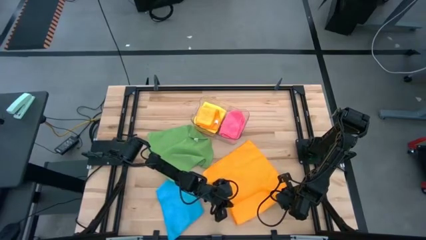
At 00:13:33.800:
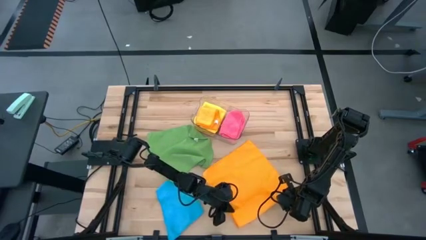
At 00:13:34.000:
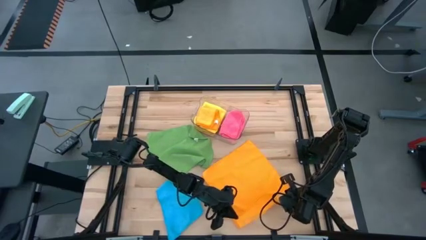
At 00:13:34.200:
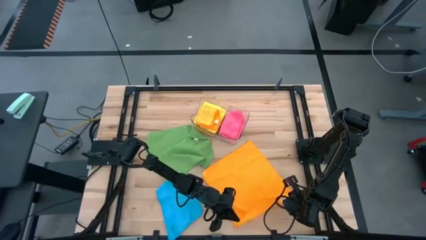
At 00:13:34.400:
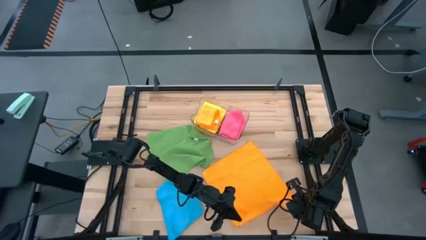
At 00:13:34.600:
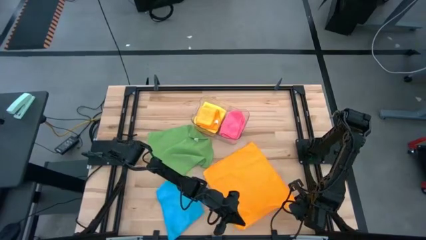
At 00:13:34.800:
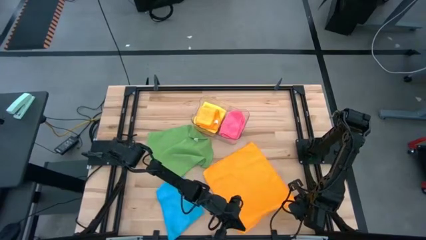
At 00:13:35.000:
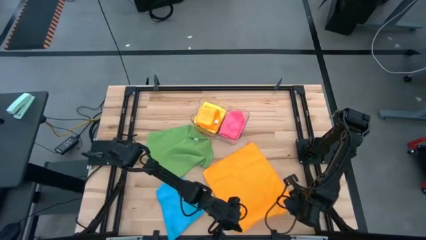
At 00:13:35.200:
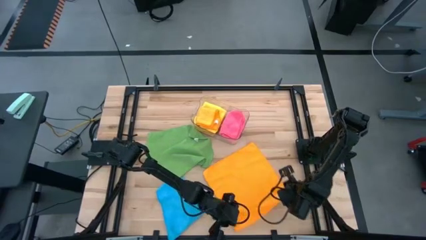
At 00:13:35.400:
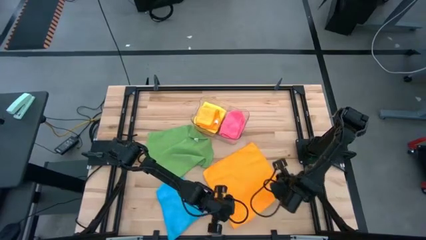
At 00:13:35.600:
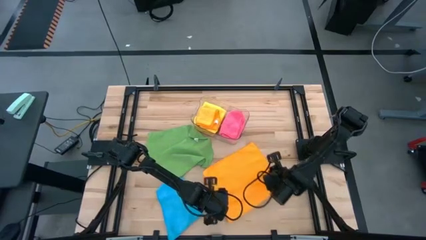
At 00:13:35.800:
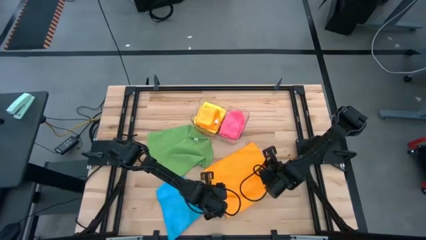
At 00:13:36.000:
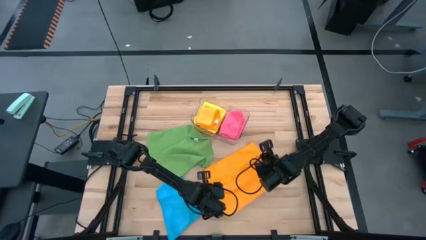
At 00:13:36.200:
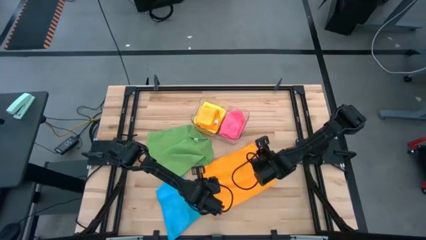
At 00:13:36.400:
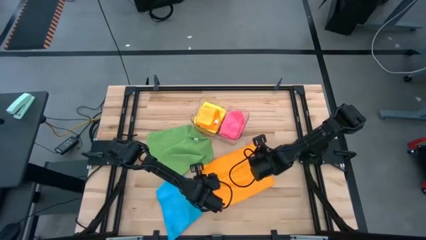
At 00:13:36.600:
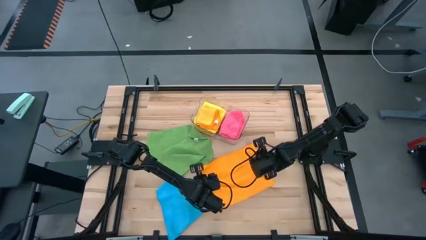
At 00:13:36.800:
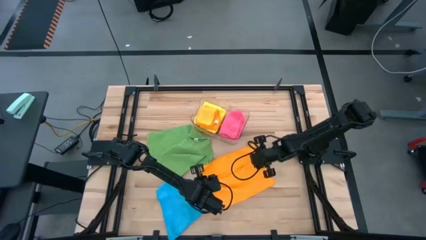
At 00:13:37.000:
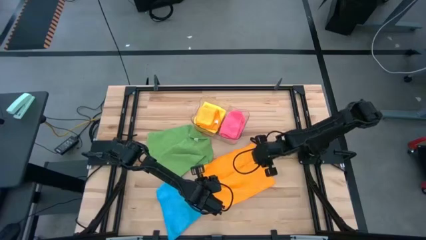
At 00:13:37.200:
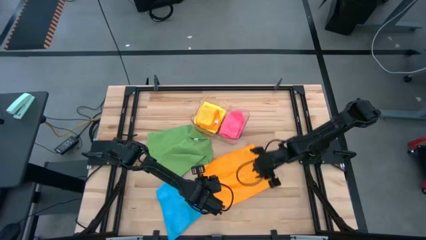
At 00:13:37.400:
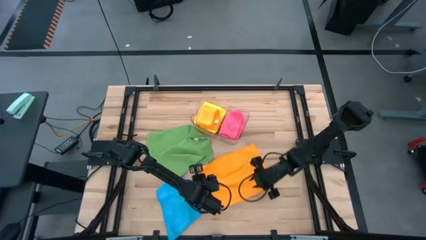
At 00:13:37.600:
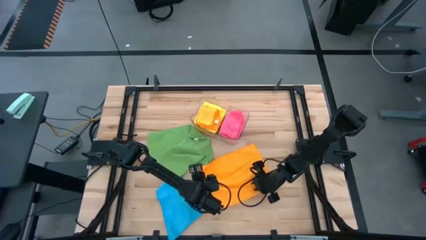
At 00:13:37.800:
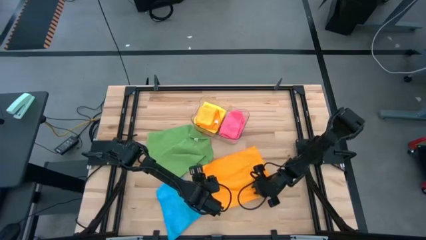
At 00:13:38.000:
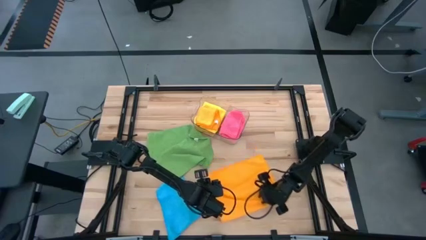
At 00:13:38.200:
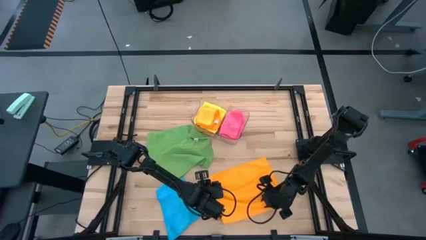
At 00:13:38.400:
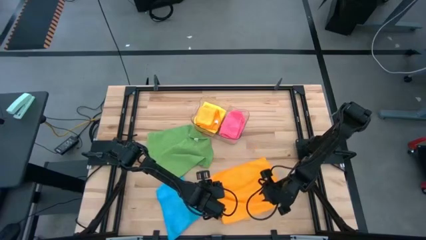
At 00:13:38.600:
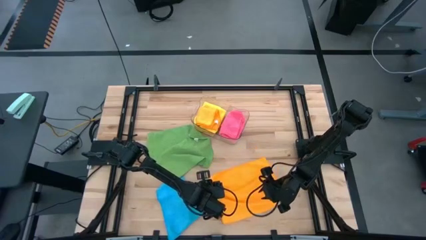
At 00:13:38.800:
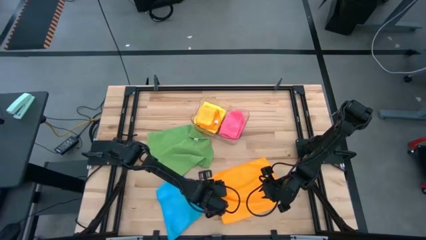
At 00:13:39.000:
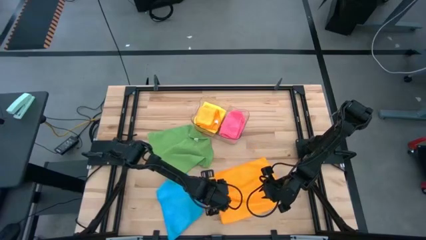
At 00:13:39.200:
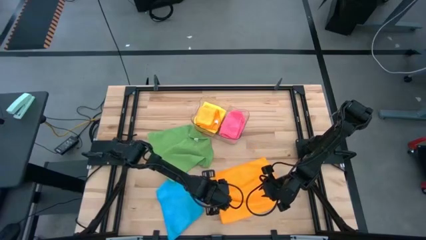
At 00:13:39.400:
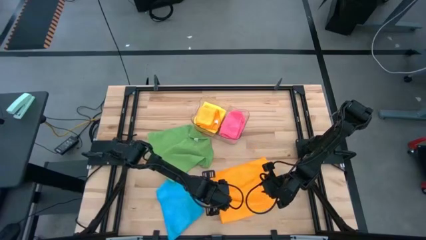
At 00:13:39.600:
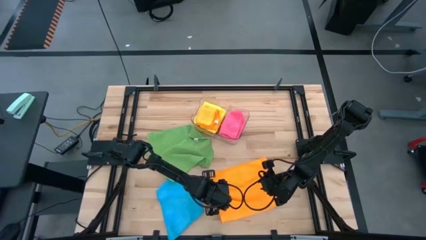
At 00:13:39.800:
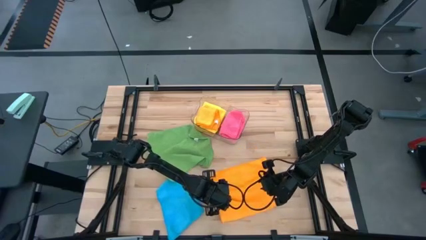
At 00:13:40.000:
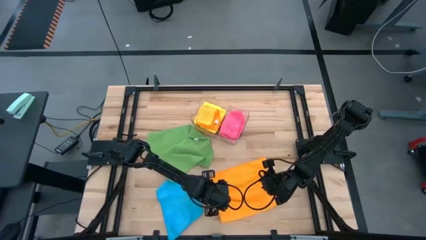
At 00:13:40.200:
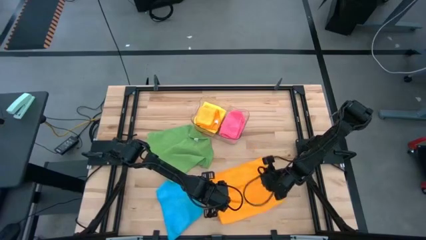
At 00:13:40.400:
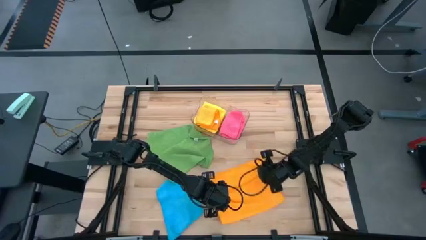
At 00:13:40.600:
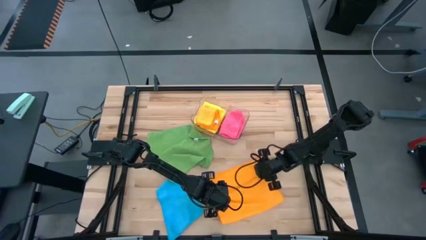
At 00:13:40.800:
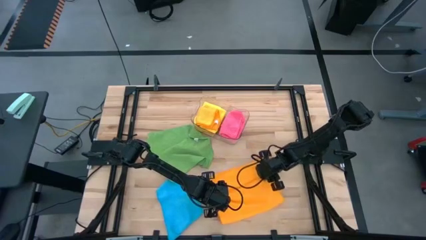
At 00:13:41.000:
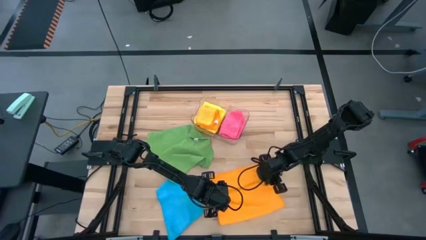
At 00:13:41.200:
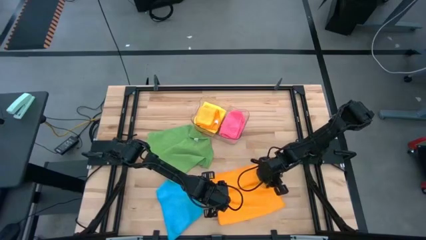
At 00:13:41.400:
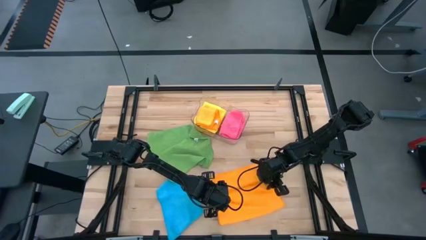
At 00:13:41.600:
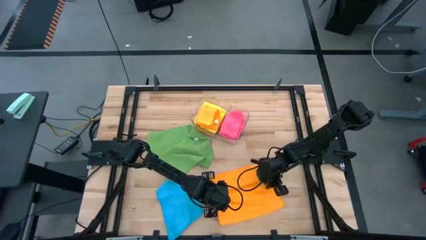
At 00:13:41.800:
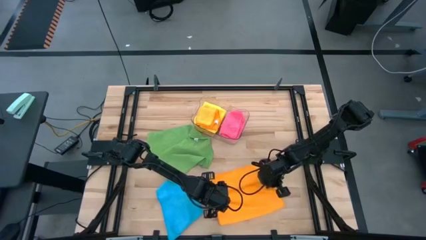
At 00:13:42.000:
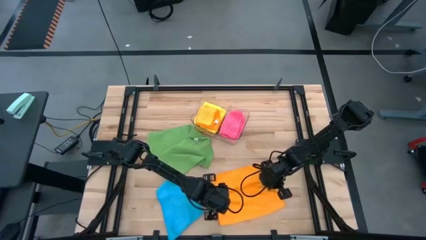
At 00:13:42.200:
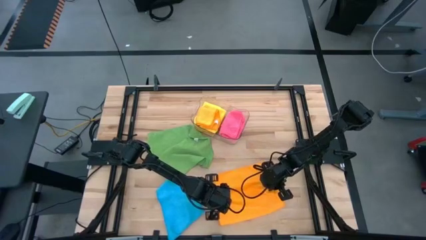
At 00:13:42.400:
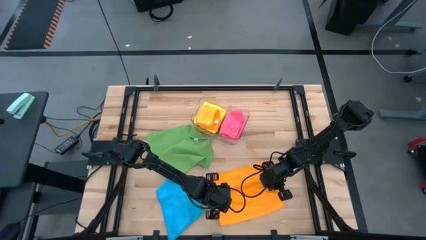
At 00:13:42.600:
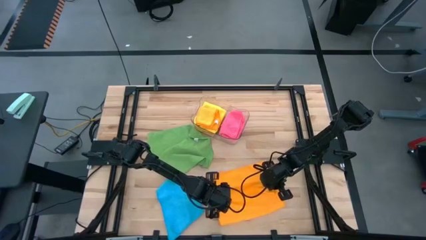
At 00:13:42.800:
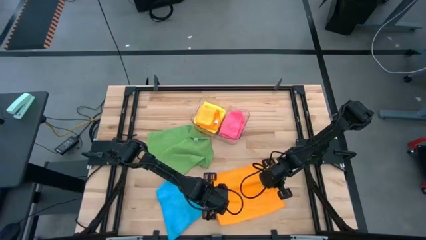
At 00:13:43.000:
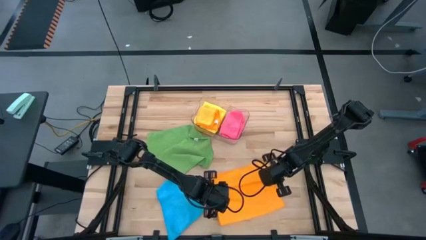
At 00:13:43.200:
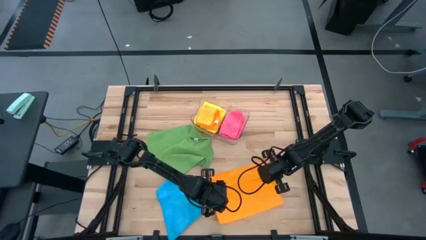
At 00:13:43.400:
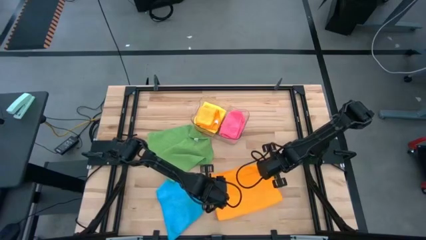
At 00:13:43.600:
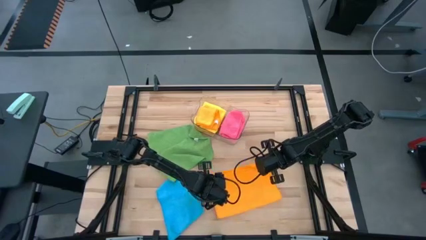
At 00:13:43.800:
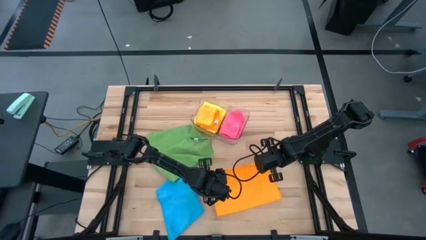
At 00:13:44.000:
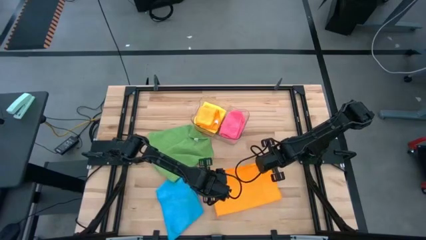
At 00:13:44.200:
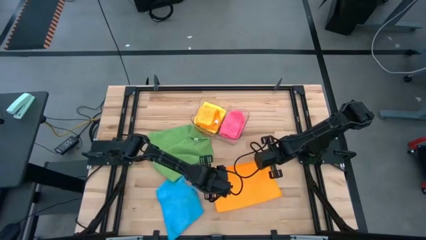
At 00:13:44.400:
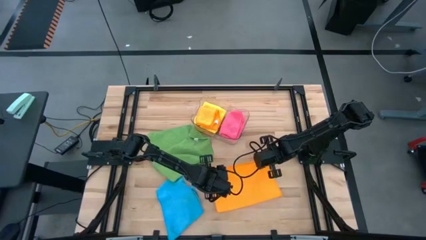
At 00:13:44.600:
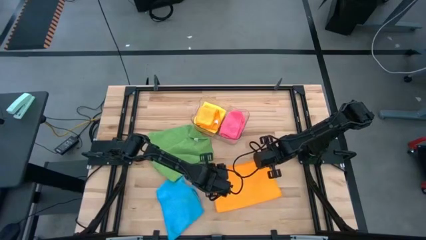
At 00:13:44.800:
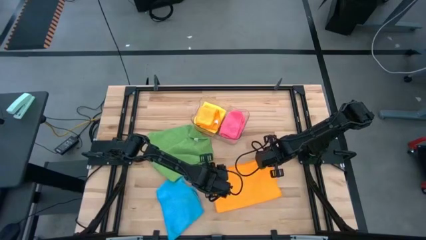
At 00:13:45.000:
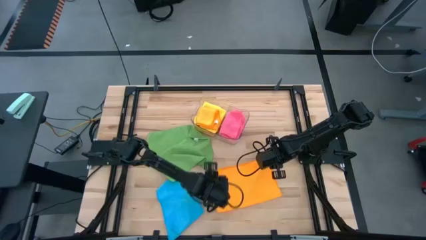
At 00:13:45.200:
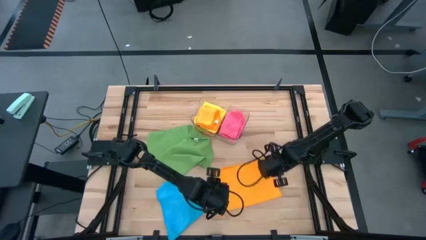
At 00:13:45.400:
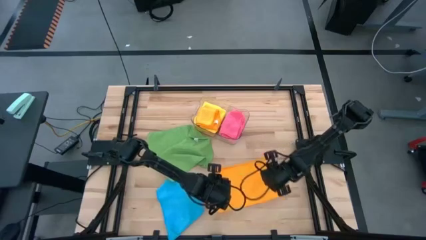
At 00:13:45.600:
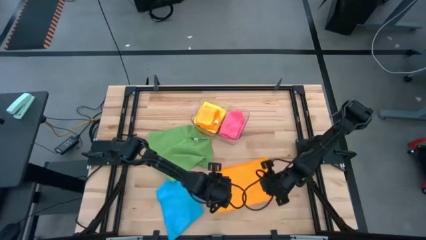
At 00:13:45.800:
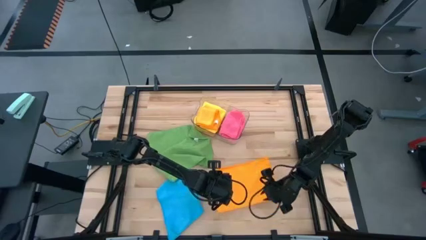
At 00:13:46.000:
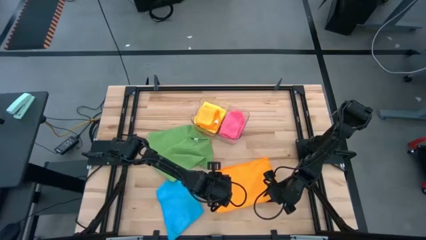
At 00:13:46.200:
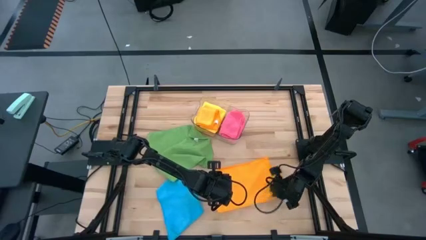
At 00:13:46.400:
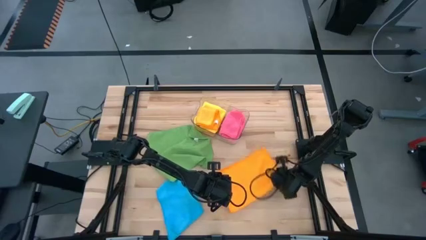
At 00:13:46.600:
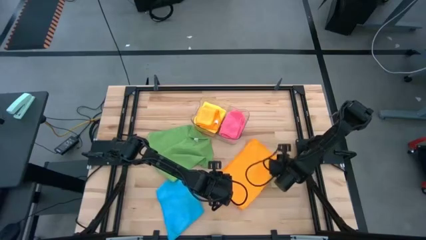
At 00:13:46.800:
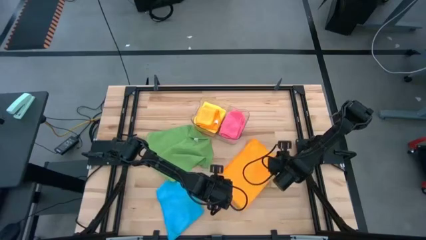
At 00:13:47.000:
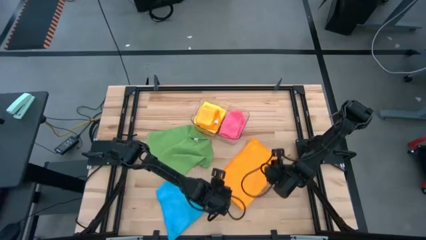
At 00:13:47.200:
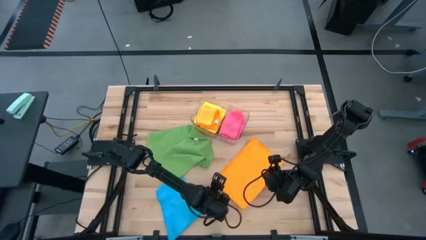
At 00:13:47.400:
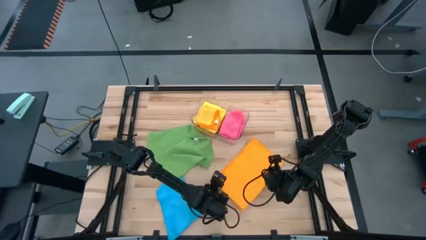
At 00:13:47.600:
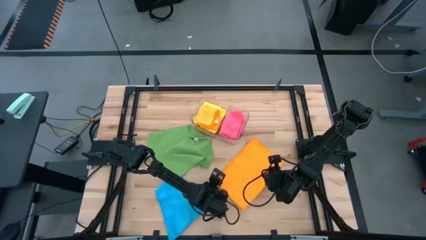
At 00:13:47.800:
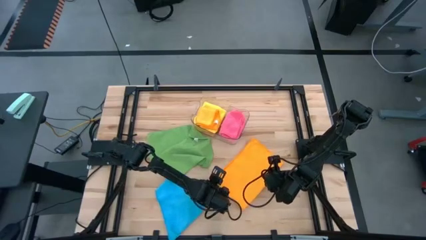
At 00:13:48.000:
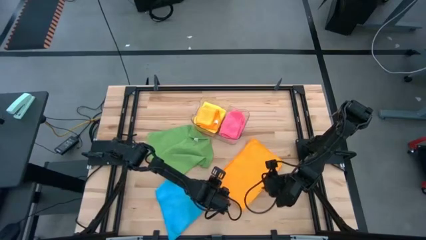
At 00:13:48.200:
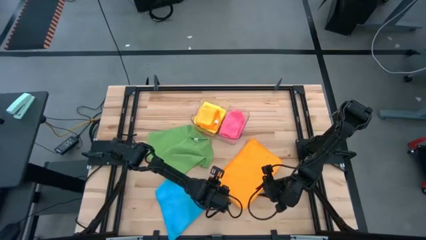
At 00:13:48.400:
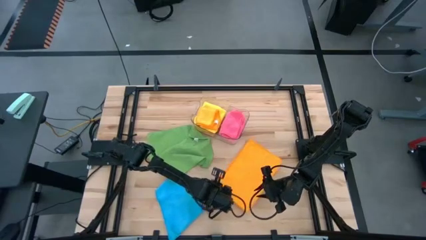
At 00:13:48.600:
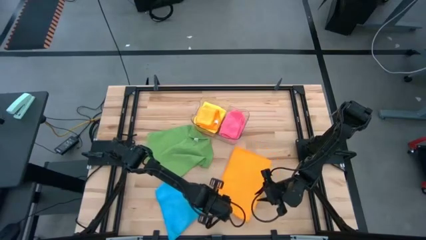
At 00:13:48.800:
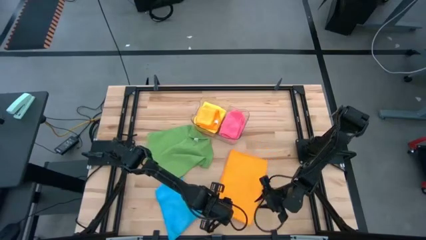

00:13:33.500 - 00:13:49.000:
Task: Fold microfiber towels
Fold the orange microfiber cloth
